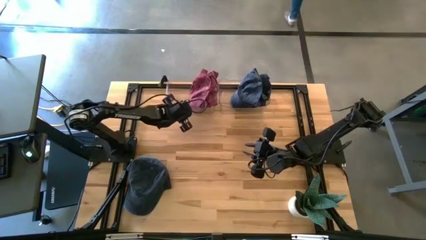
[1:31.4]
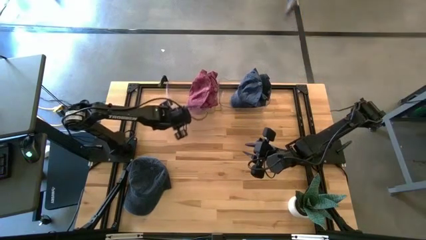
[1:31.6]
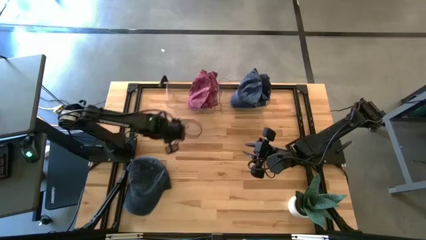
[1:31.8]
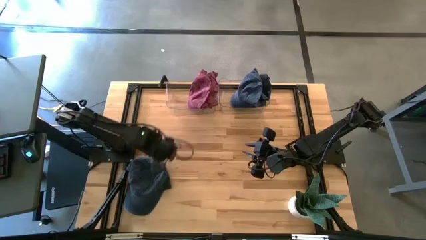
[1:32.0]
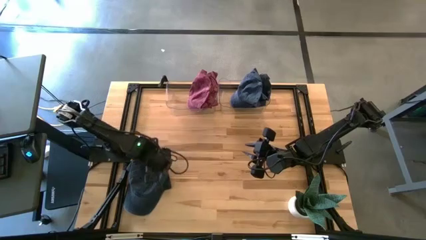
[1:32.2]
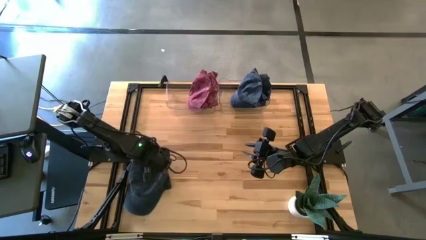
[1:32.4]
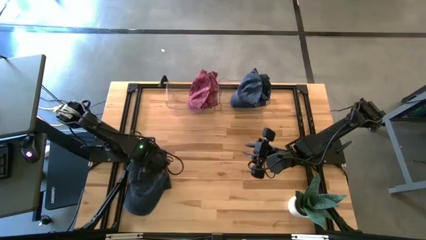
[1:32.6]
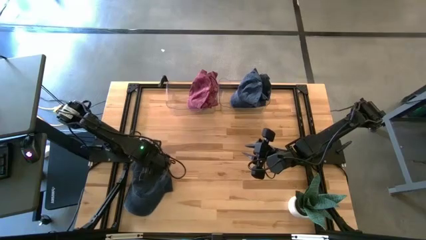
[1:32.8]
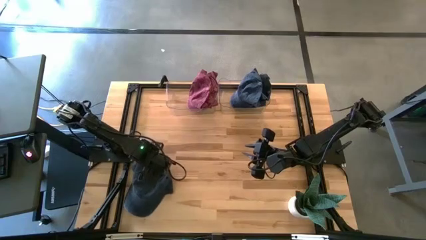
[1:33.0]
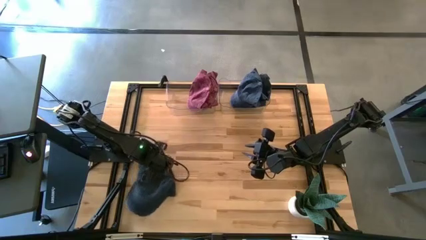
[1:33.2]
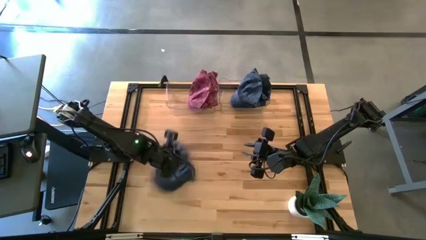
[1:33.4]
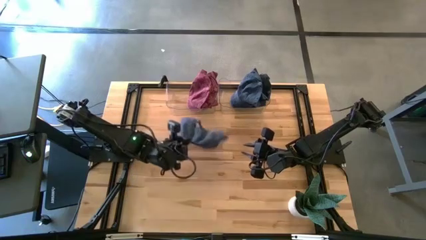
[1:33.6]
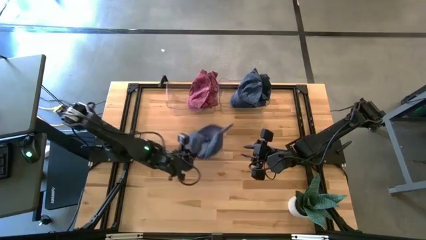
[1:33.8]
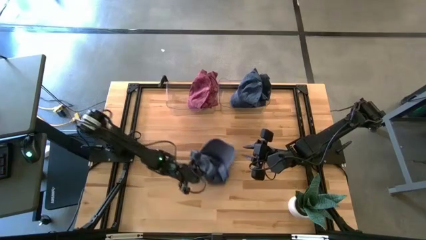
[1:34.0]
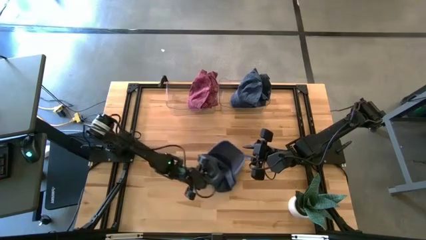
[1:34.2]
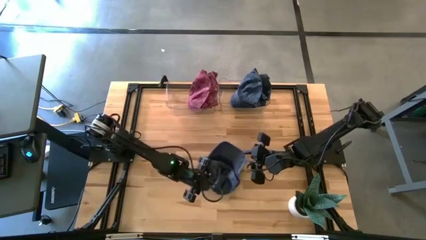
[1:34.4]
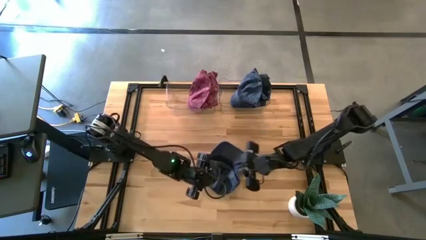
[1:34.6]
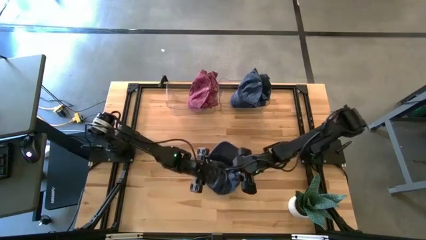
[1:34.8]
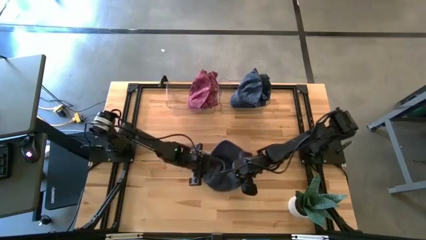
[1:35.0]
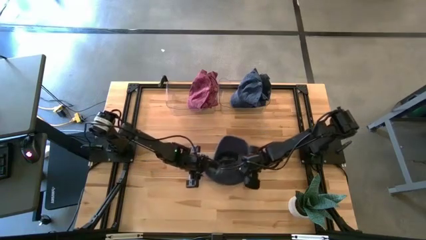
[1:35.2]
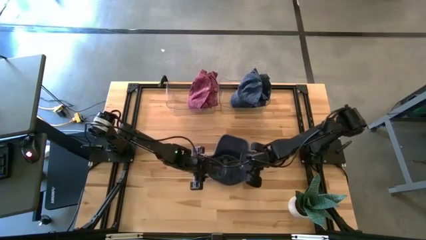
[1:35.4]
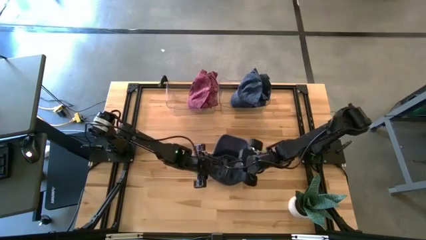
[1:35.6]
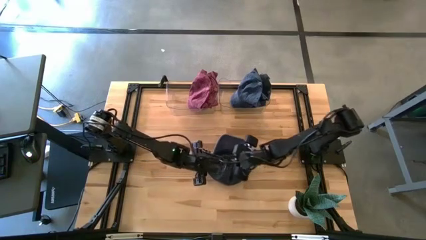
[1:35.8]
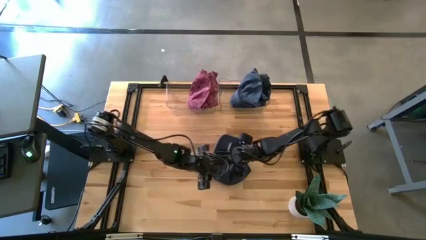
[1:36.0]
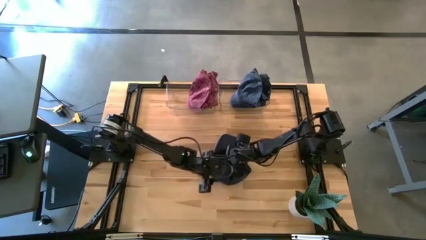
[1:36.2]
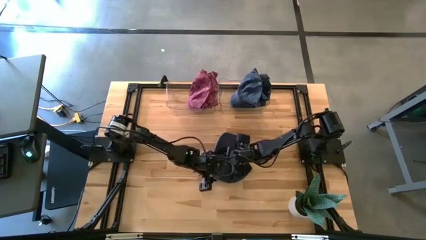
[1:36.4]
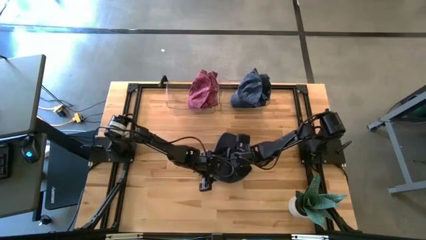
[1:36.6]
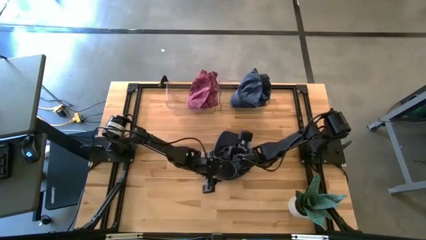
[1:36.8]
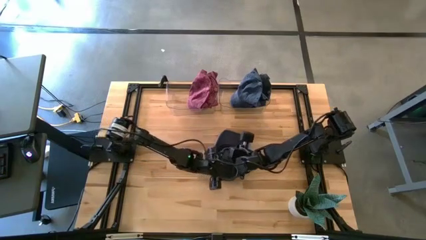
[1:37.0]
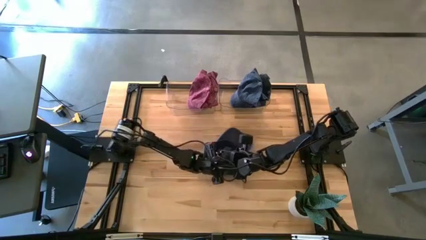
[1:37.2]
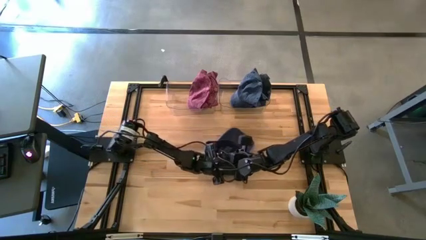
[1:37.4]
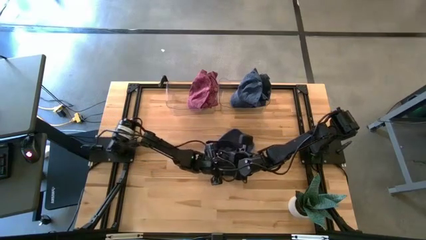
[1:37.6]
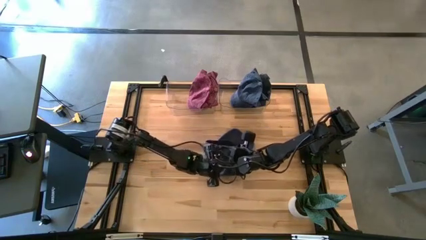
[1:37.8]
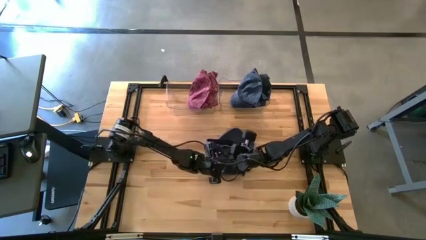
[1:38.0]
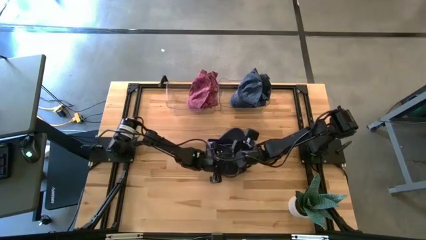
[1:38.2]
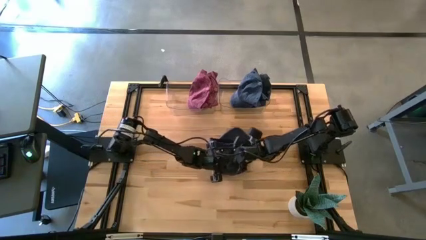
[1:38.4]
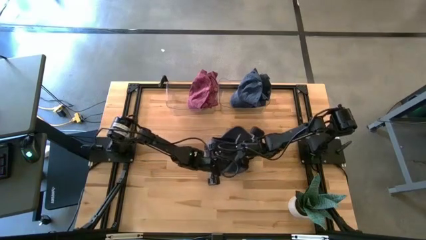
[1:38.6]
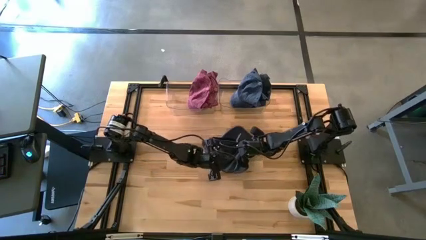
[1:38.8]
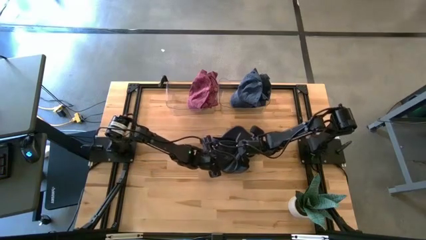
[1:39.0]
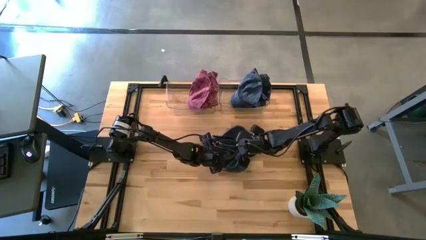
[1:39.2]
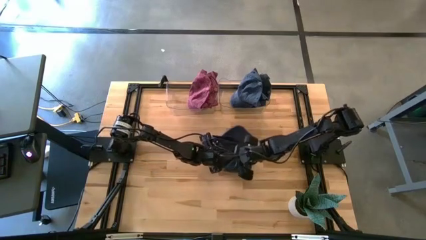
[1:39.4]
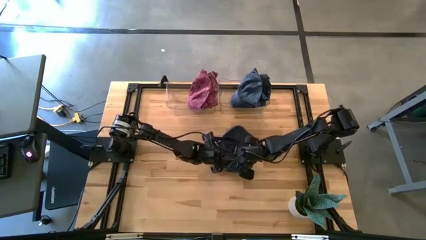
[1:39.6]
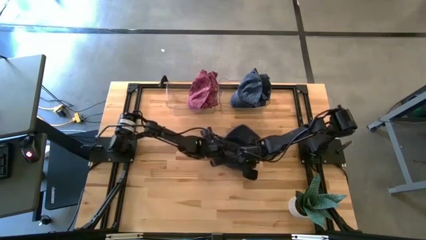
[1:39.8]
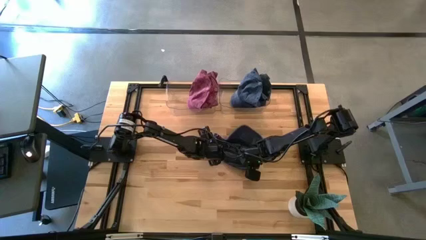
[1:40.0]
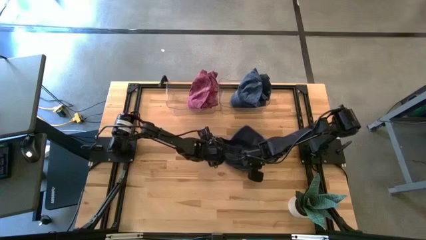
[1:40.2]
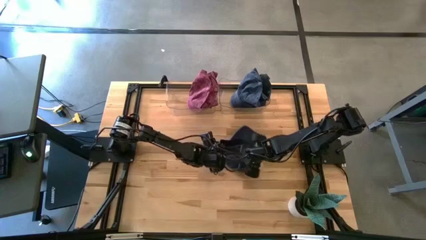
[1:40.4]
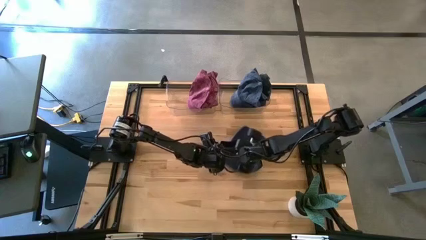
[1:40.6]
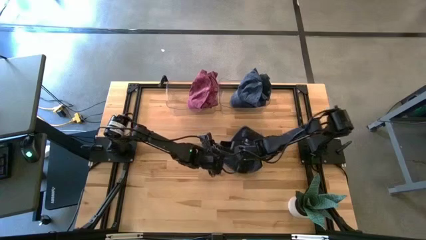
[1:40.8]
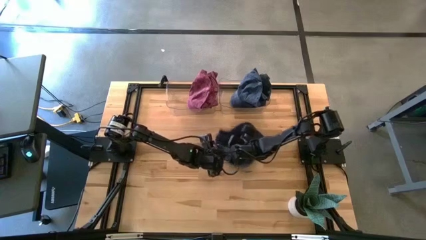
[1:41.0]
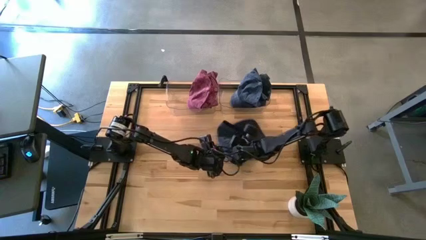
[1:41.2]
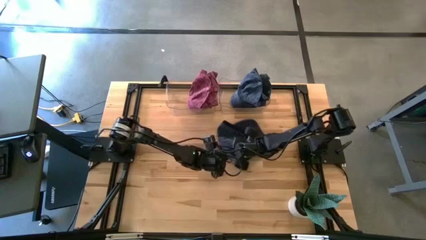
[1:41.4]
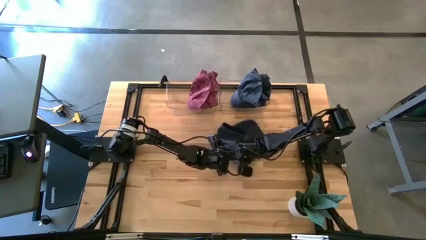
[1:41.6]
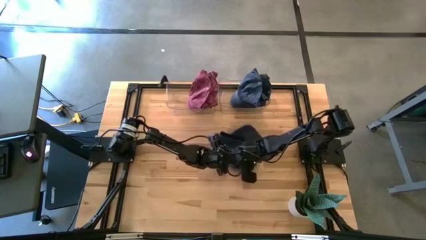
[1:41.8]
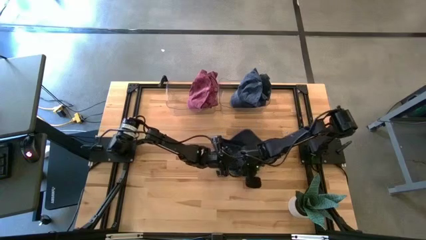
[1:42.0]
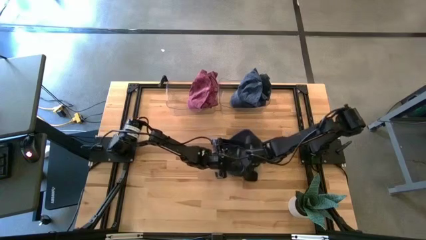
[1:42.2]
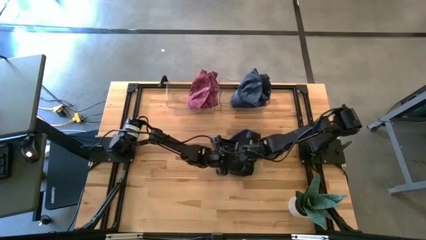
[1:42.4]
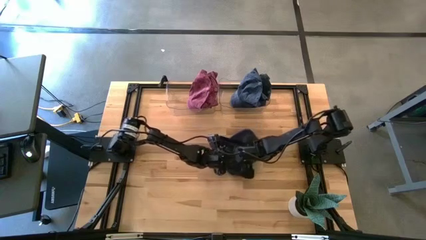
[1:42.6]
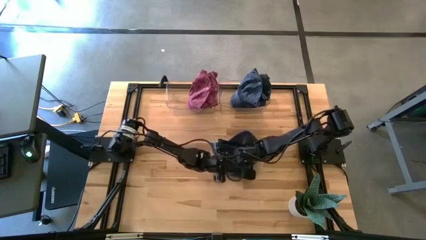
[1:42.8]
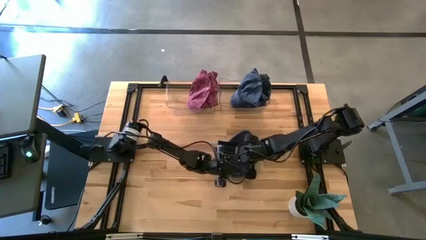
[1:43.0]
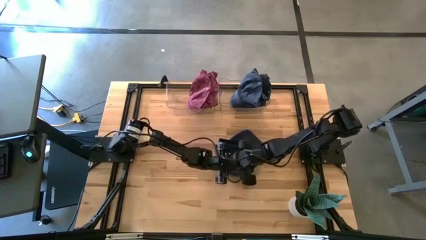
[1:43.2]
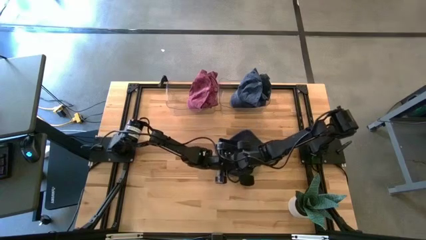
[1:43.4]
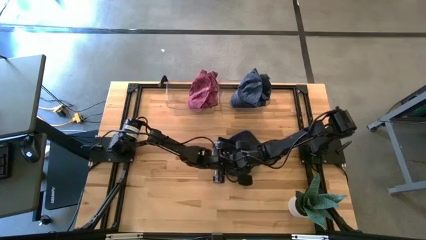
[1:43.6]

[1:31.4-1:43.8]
Task: Pick & Place hat
Put the blue cap into the right transparent bin

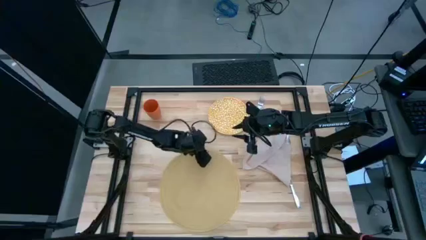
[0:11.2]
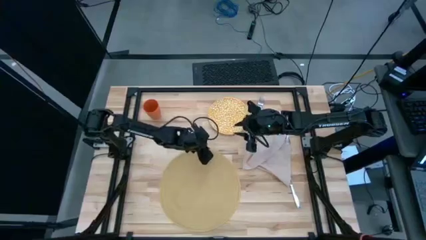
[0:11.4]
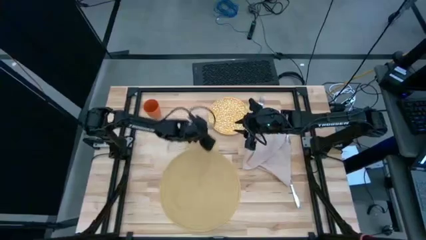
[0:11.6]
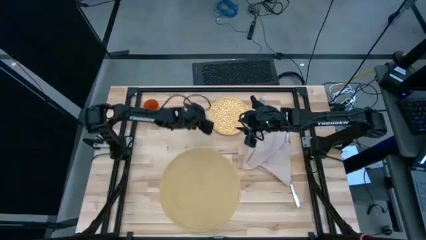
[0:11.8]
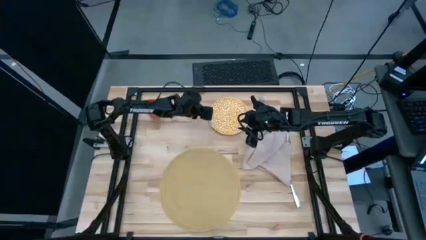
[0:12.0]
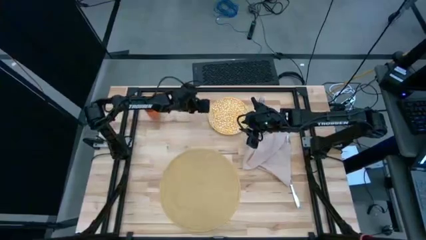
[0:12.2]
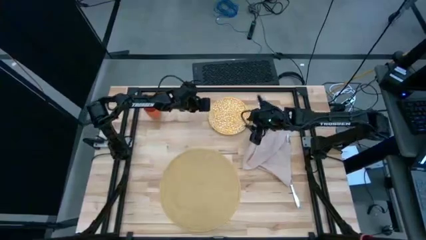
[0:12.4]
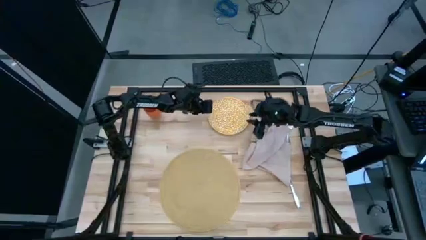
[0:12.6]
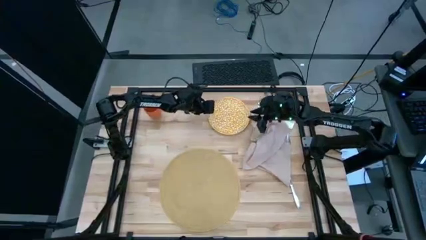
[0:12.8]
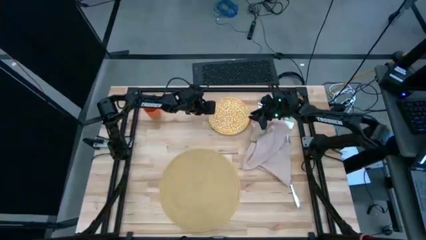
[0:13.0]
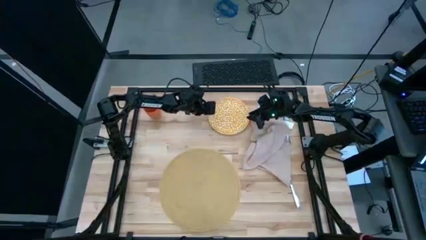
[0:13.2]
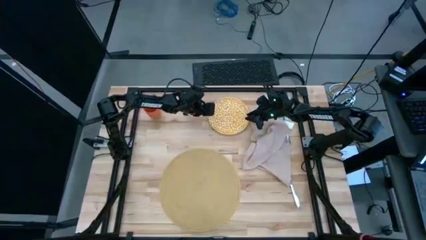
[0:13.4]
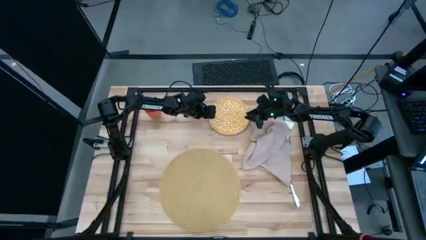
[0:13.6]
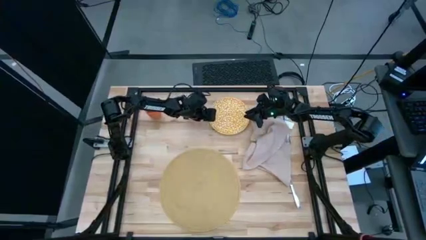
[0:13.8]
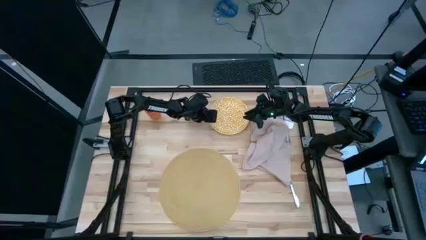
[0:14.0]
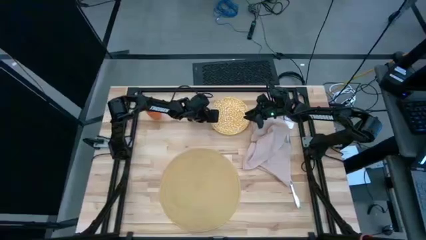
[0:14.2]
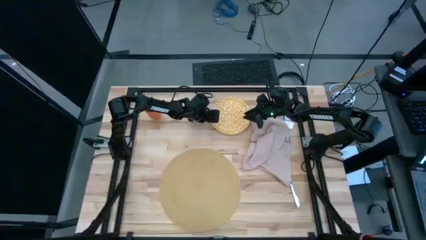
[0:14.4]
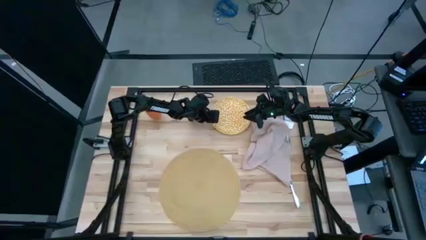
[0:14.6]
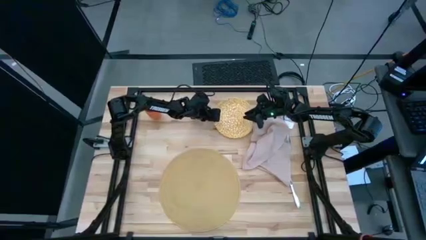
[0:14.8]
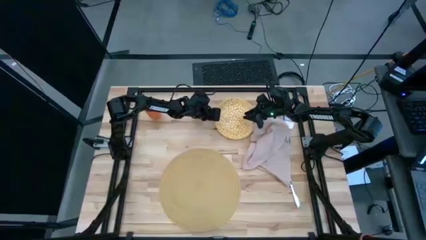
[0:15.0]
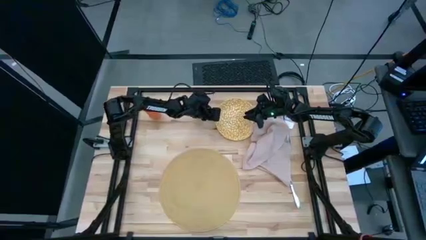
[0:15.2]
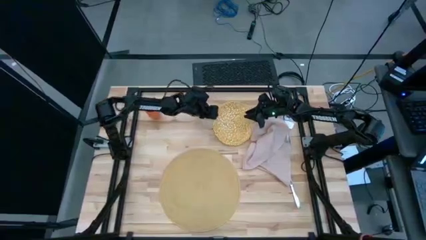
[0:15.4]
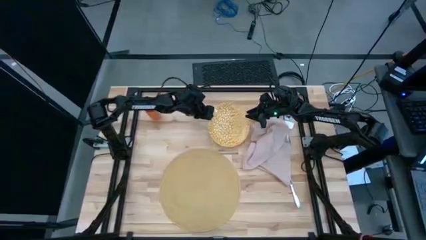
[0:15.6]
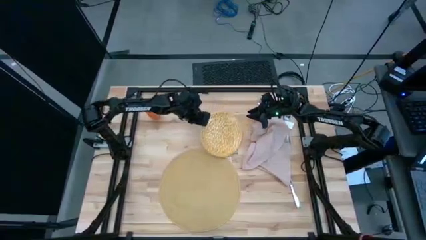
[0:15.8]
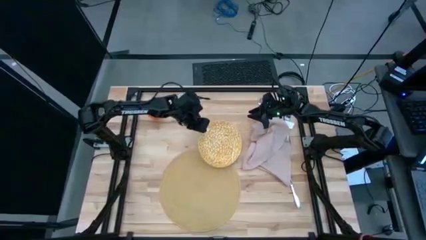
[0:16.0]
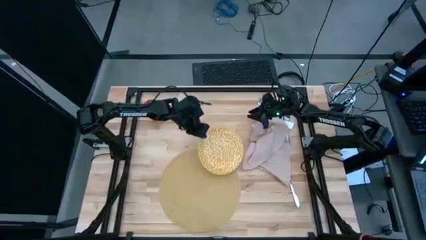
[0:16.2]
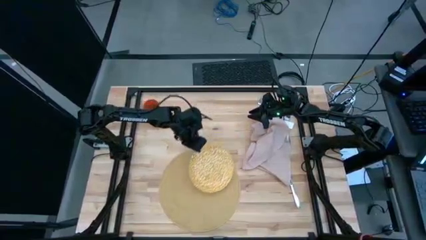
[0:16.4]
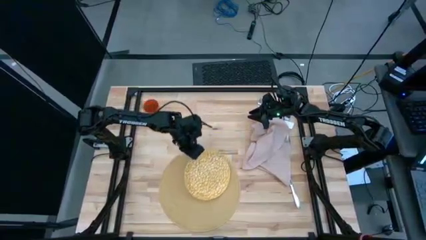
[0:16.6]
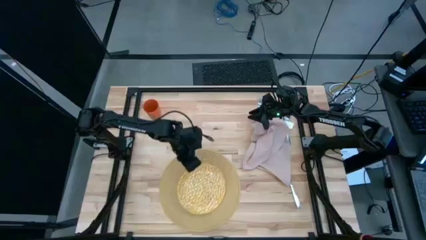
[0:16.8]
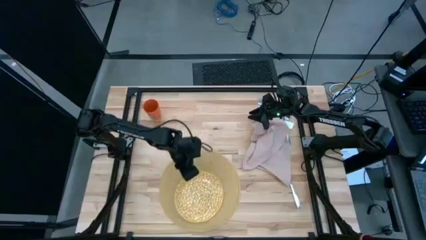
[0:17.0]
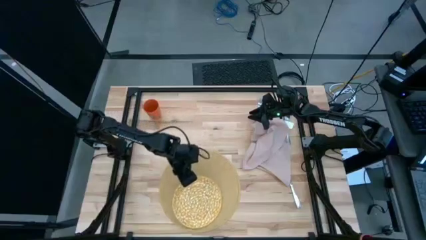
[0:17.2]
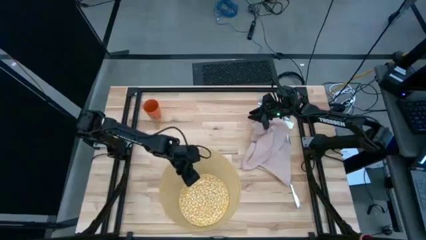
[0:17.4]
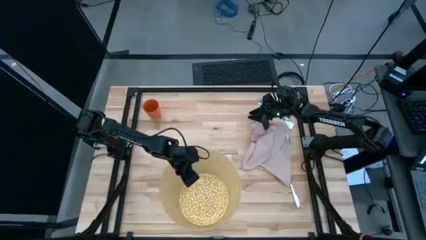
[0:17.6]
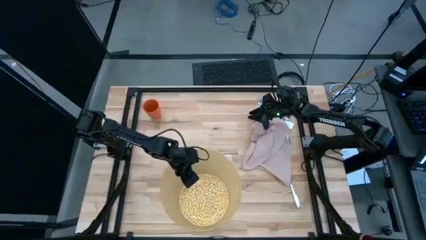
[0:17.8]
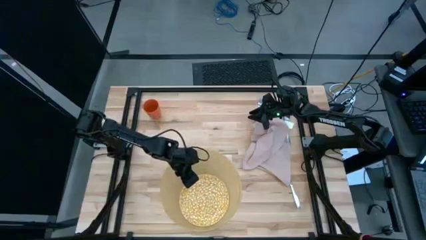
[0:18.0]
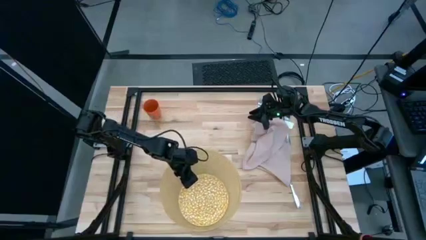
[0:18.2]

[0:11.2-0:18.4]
Task: Set table place
Put the yellow plate on the bottom center of the light brown mat
